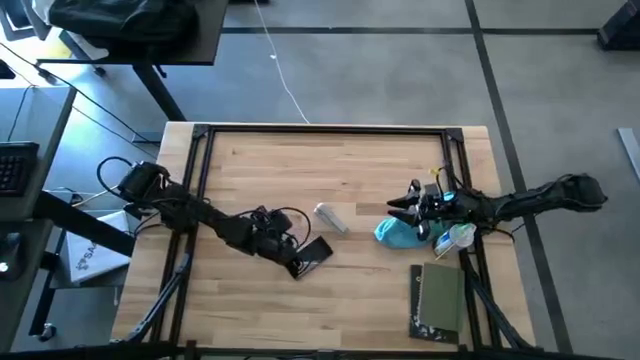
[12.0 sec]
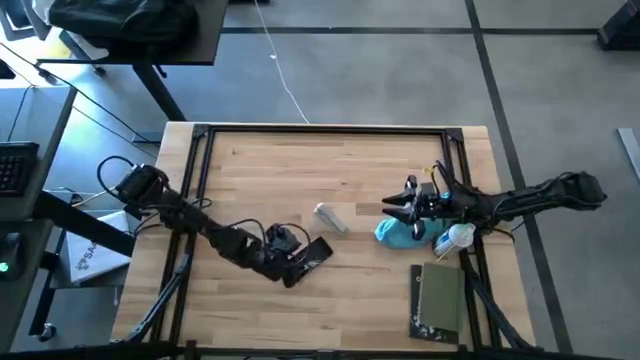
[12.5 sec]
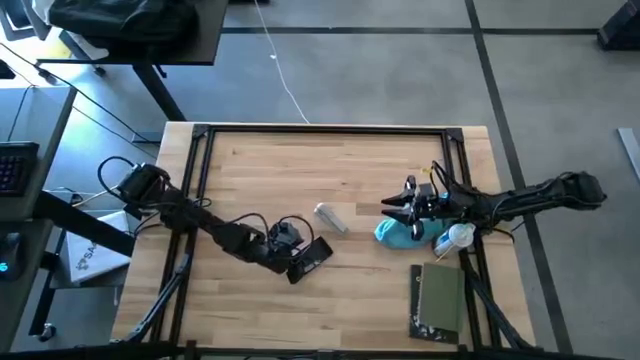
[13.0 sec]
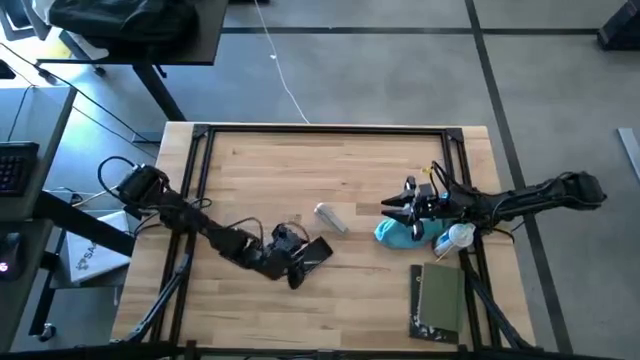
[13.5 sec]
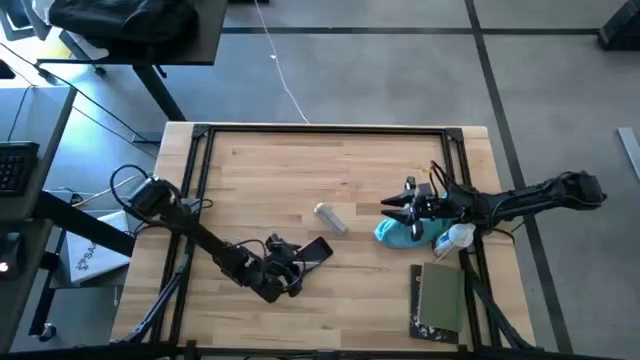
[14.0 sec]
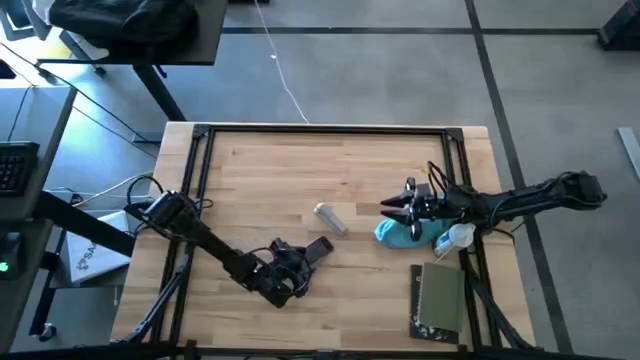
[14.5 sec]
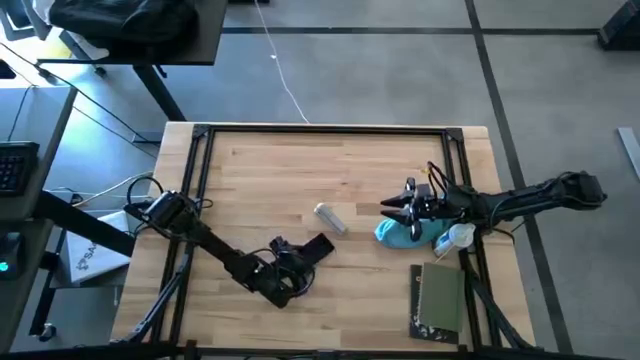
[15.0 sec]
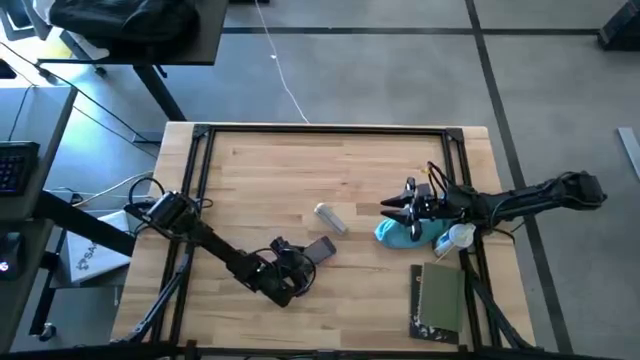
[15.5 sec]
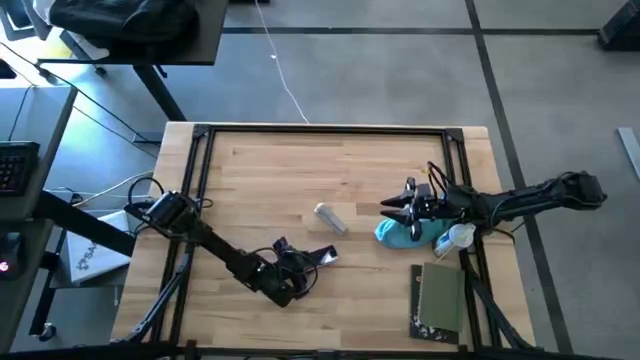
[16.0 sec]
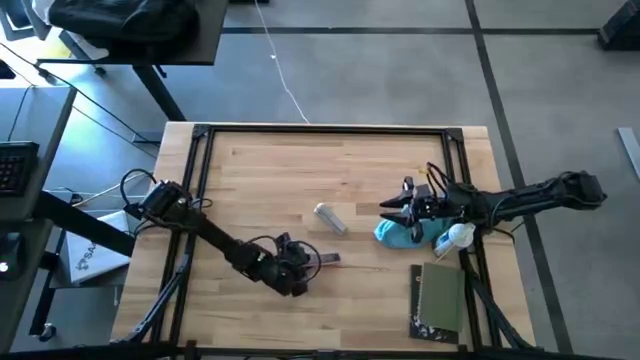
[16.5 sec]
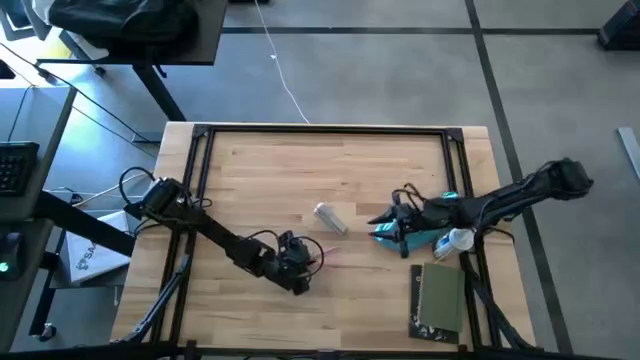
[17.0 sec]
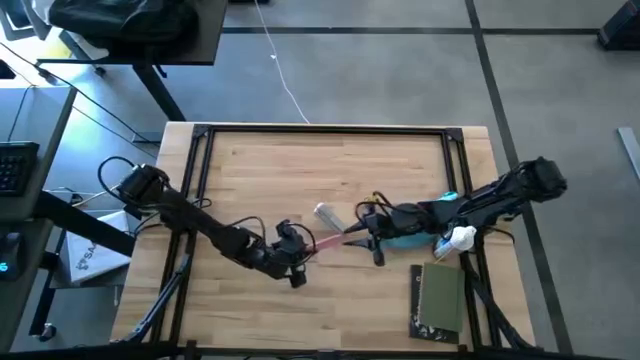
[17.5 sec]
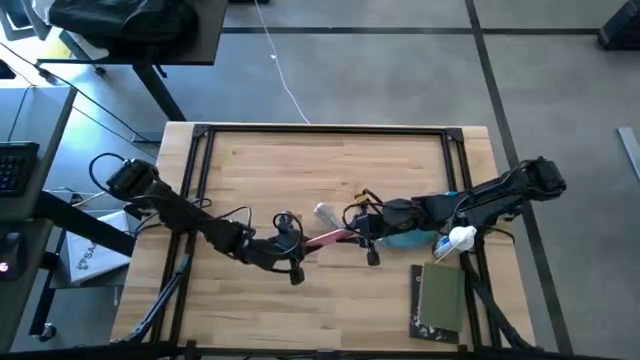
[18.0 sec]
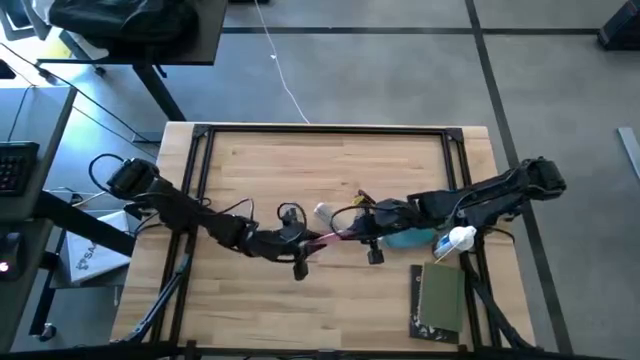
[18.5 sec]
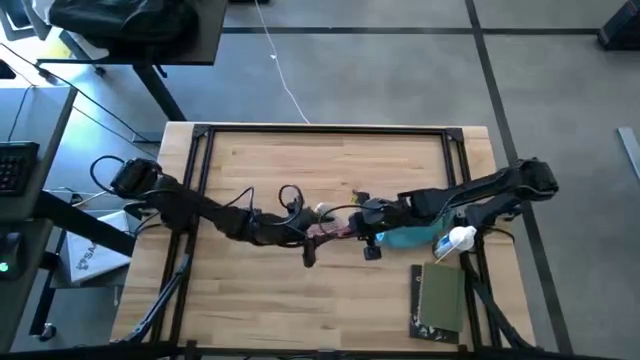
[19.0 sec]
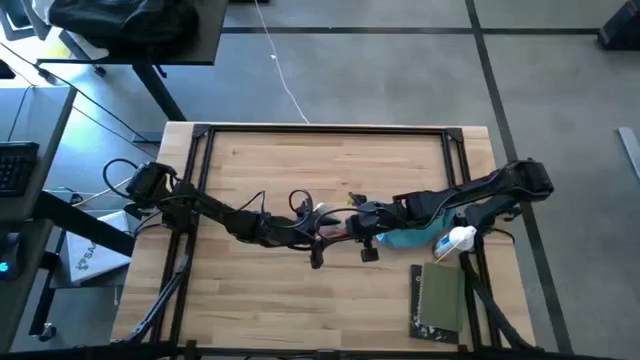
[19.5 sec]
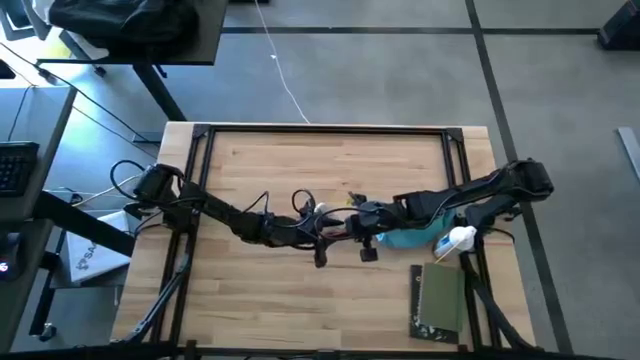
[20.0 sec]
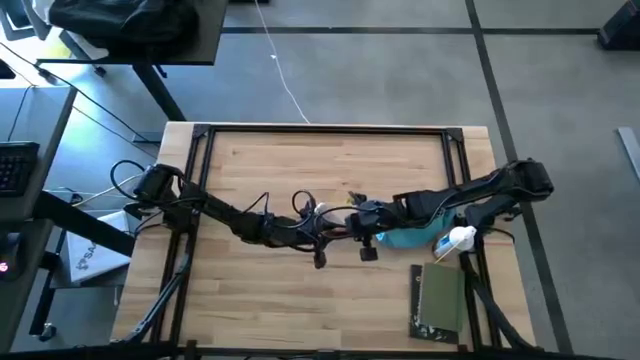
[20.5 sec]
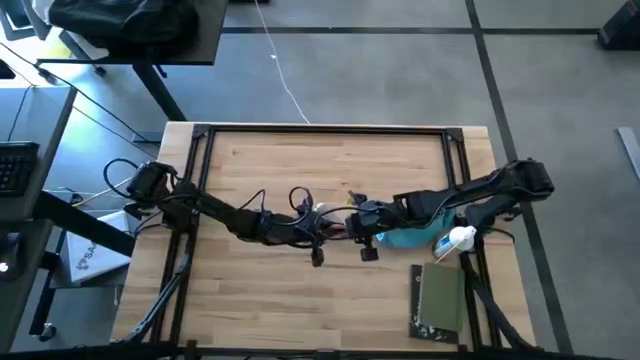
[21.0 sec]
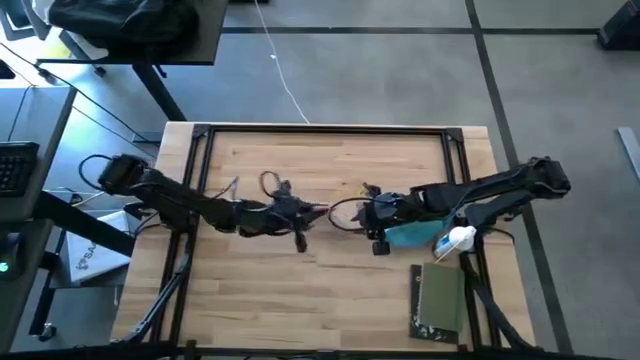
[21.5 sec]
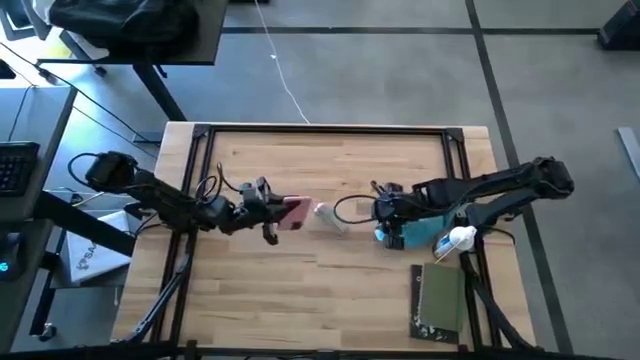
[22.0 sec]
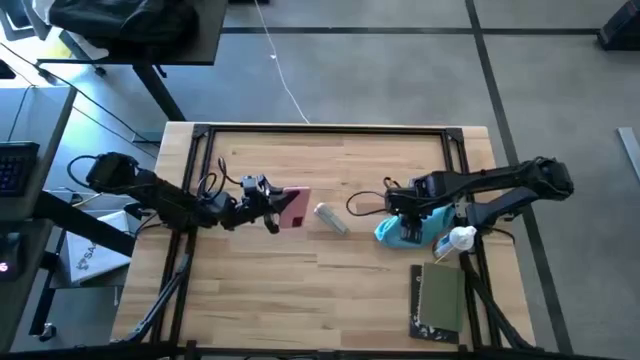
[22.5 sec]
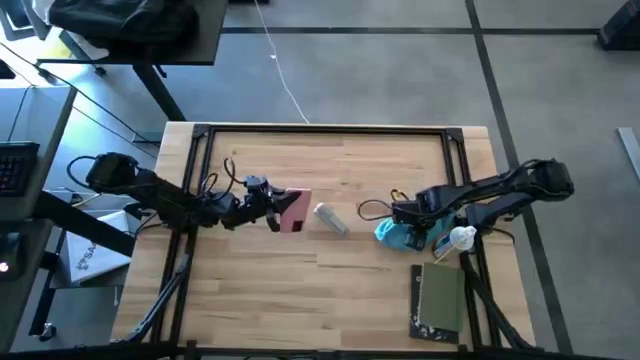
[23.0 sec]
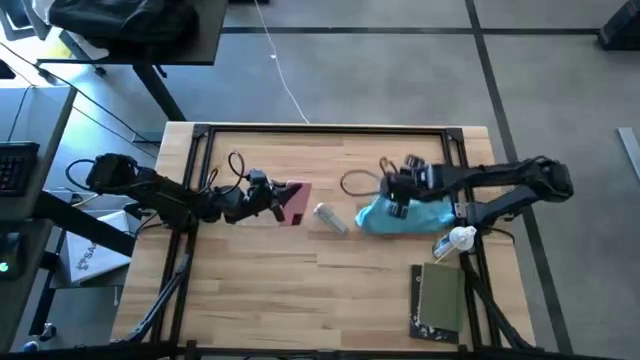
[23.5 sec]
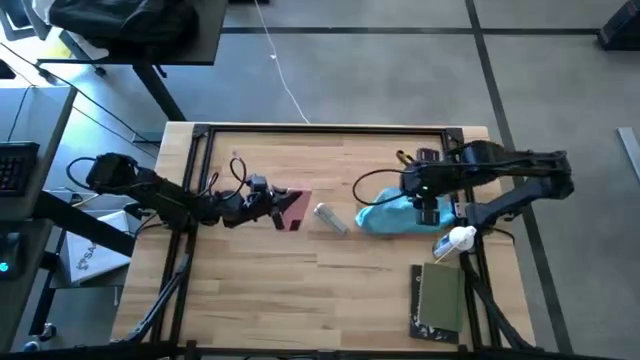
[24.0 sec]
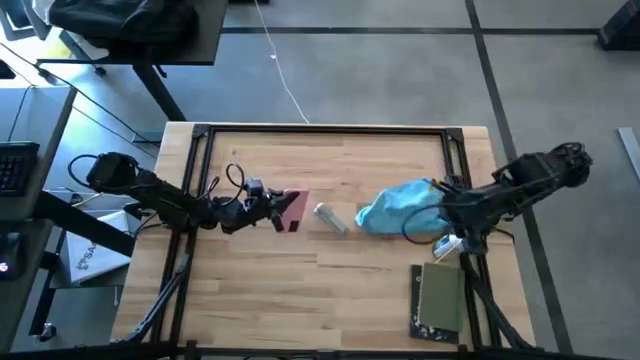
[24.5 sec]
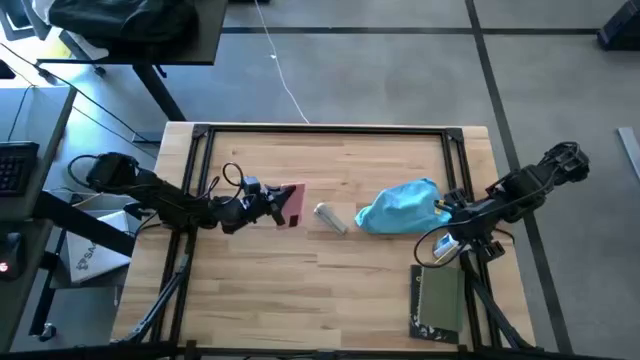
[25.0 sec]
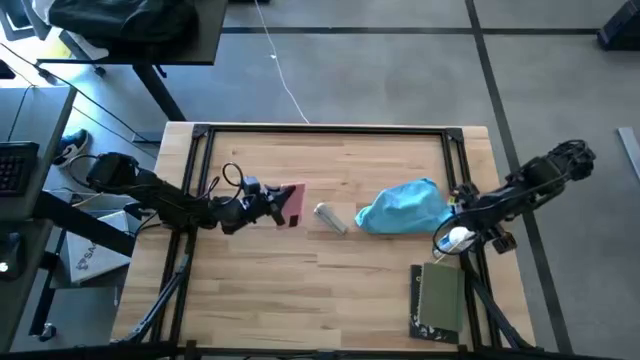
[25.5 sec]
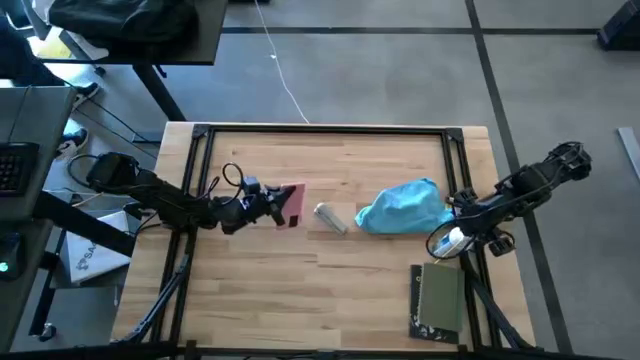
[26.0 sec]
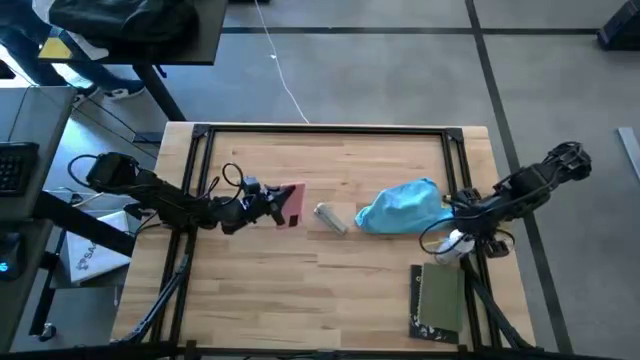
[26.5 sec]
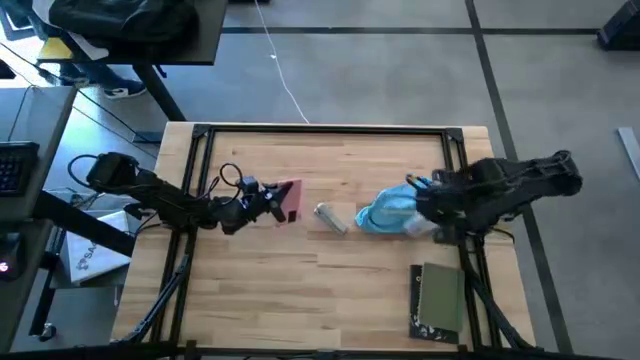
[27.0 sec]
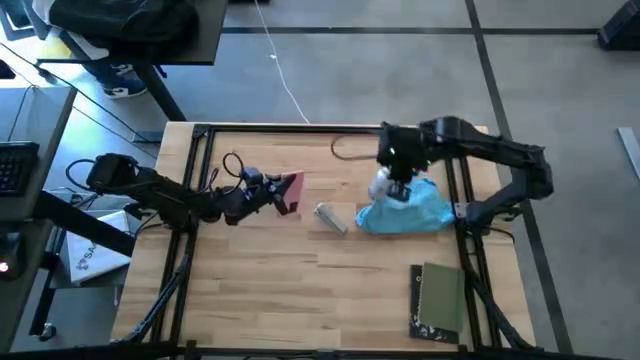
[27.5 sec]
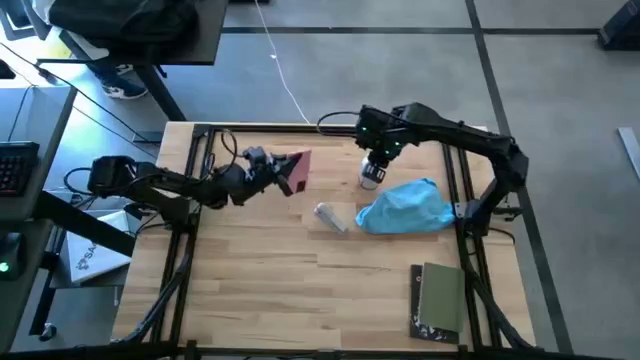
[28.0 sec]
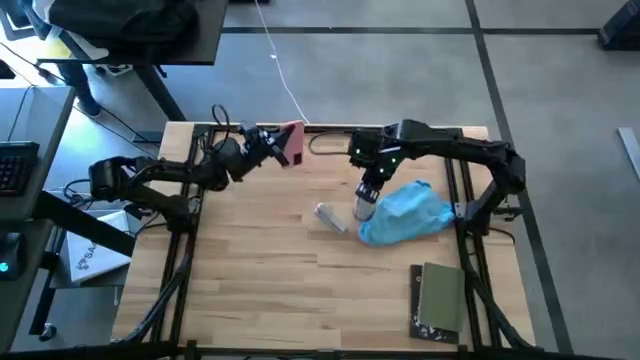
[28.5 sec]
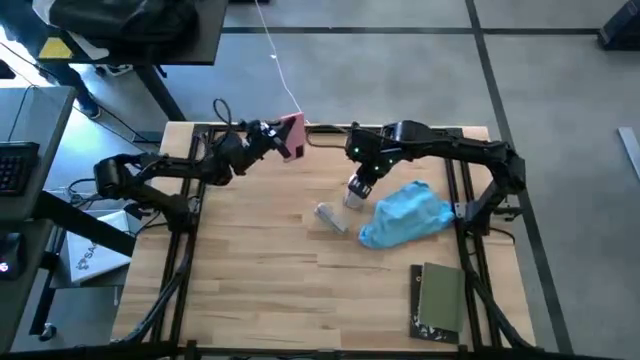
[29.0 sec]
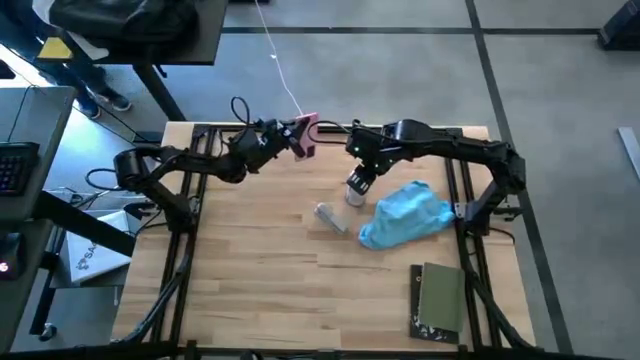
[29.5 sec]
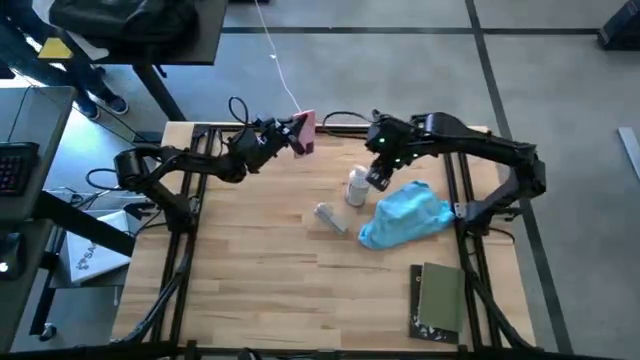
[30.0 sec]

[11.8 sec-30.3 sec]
Task: Apply microfiber cloth
Spray the pink phone with the spray bottle
